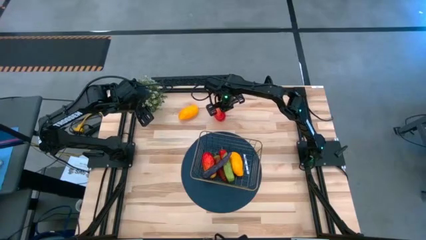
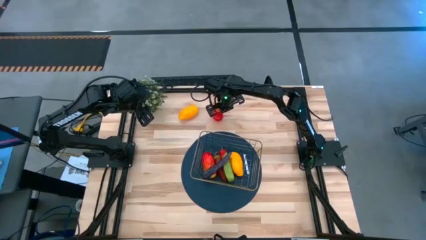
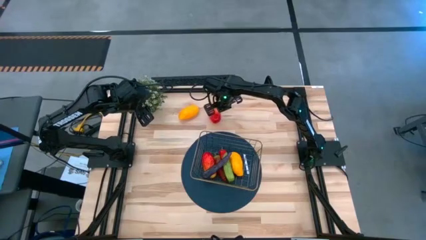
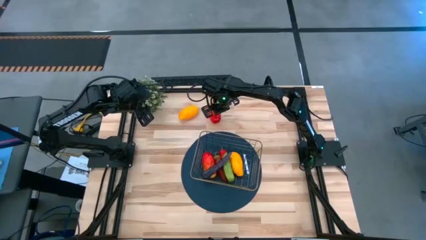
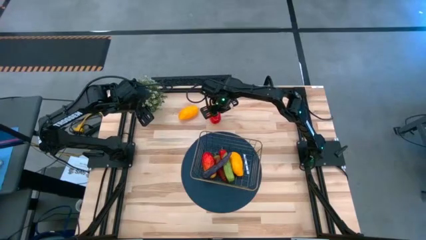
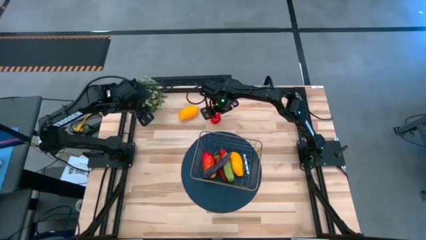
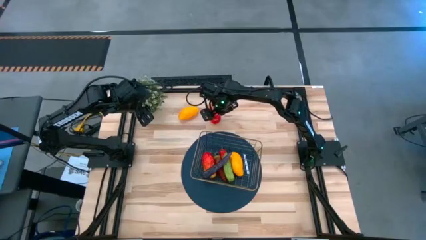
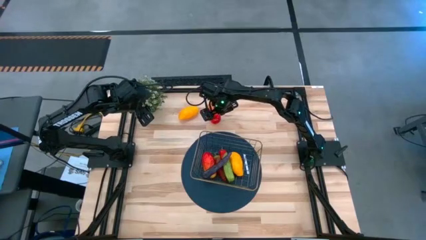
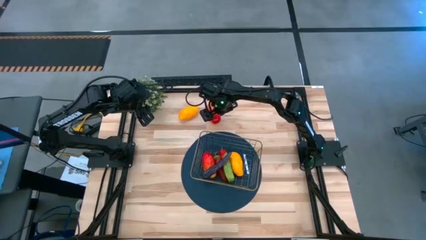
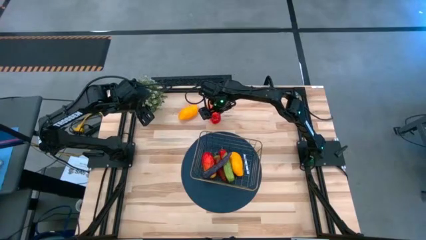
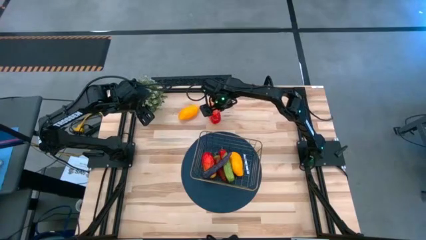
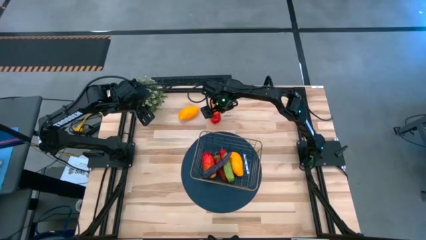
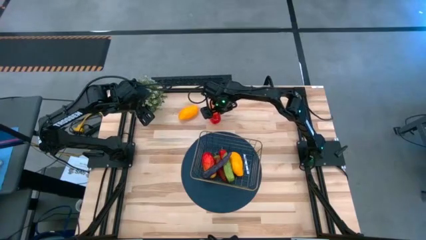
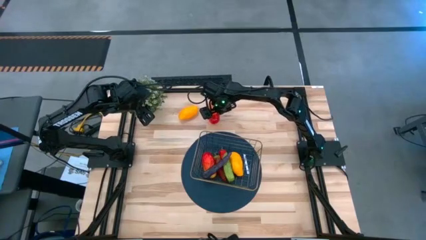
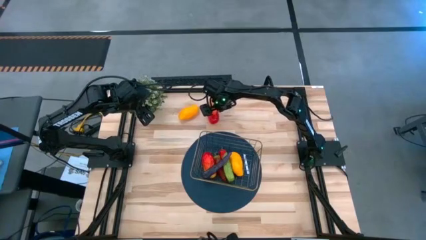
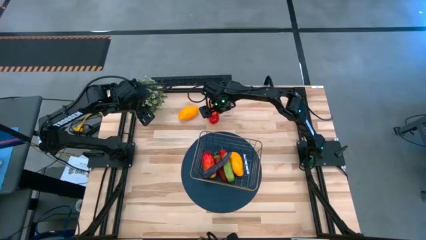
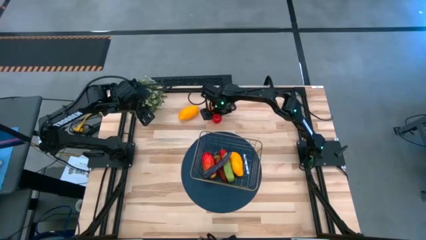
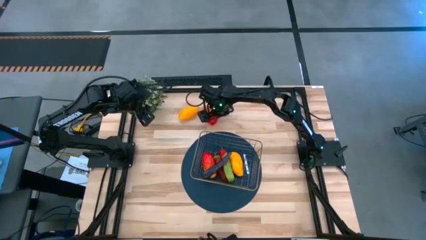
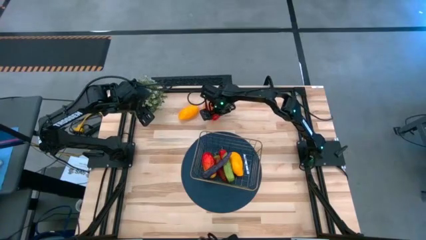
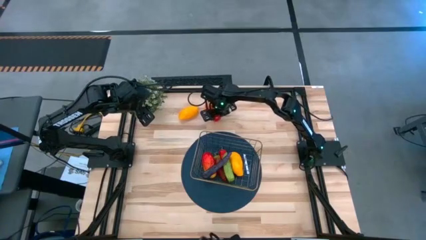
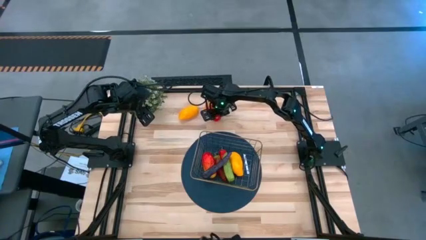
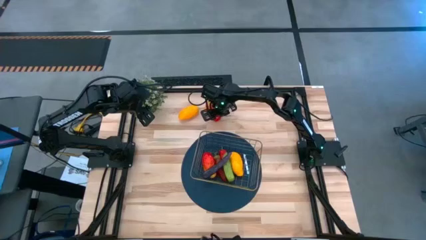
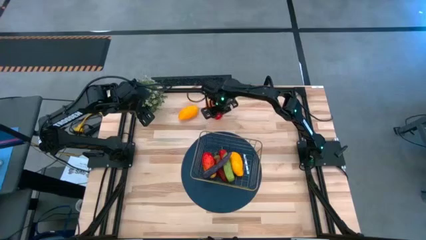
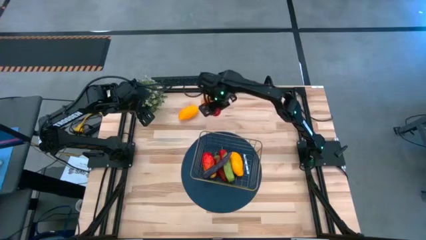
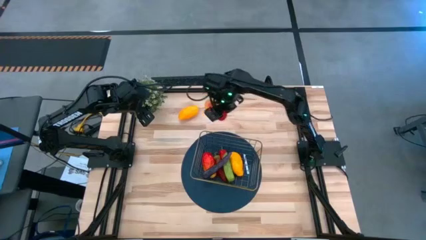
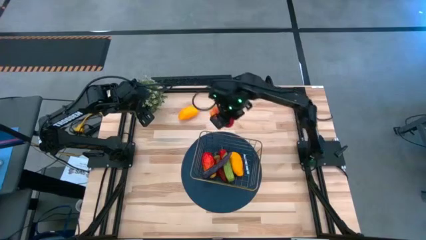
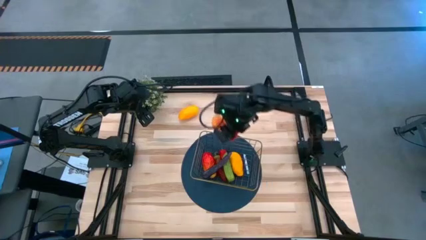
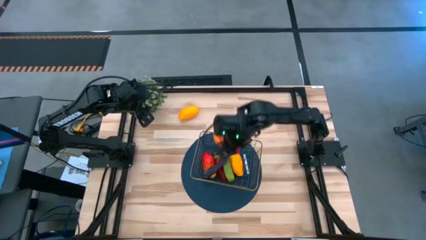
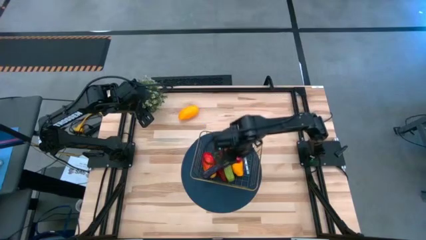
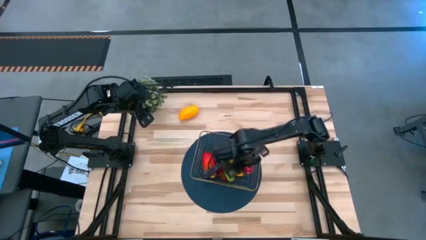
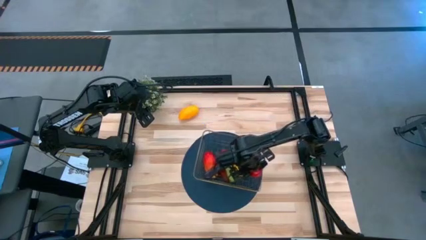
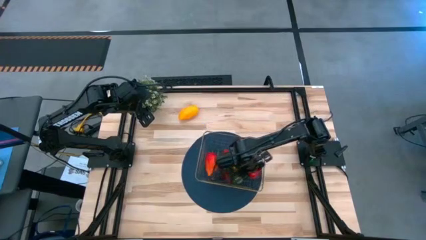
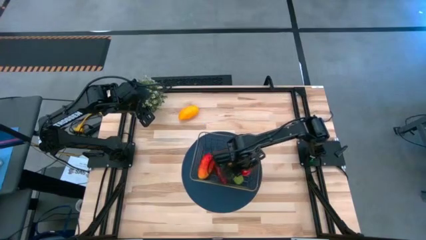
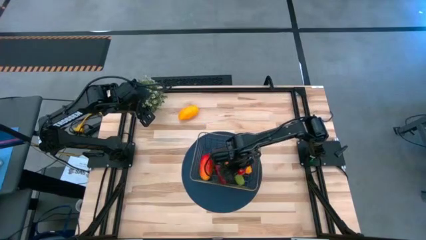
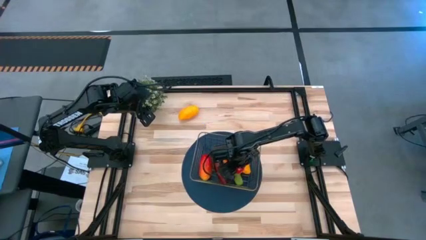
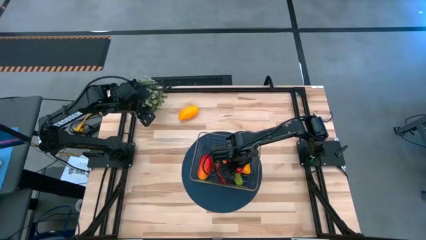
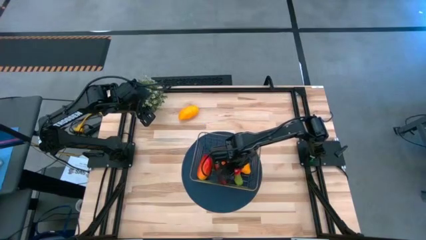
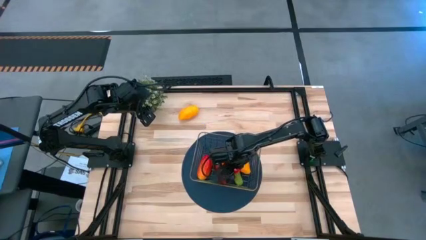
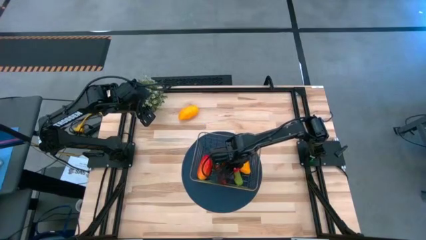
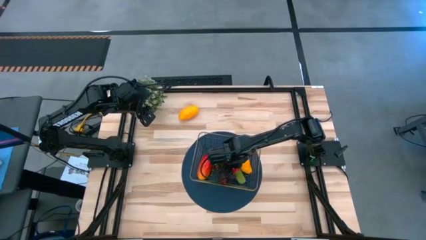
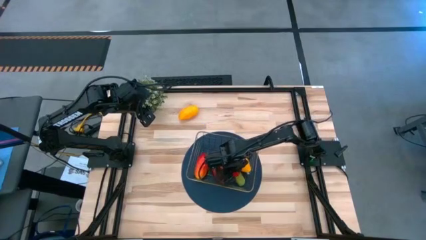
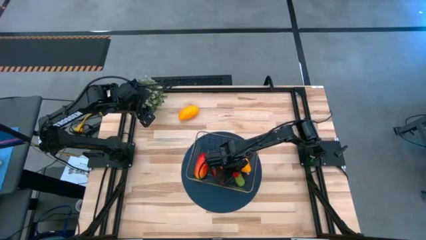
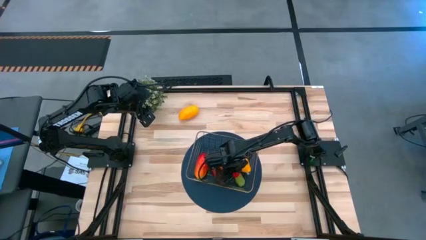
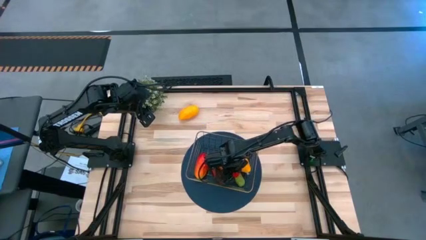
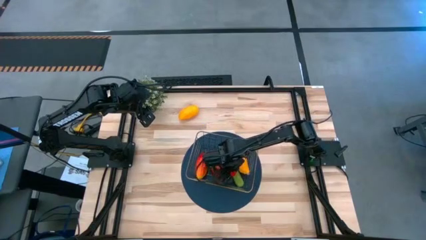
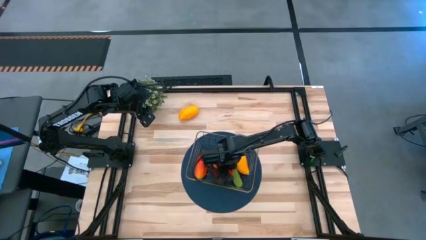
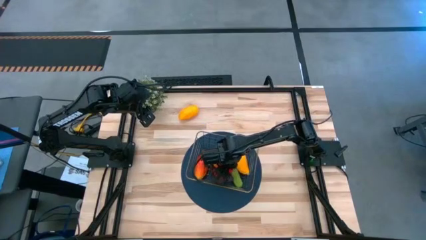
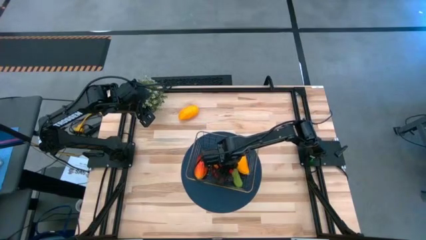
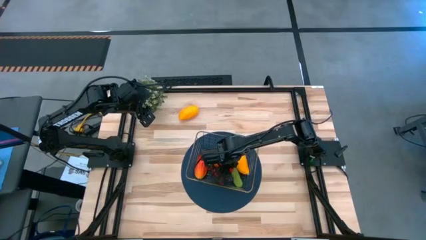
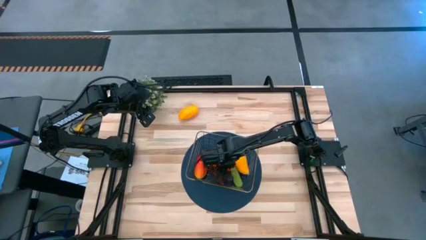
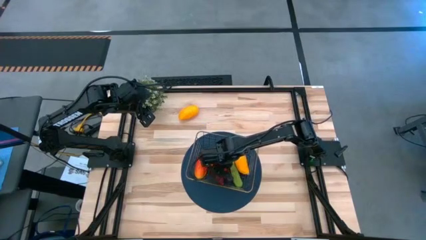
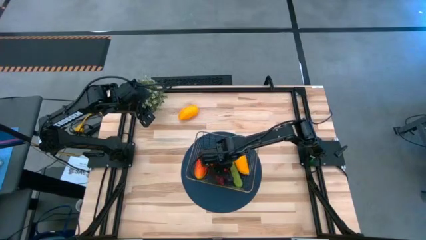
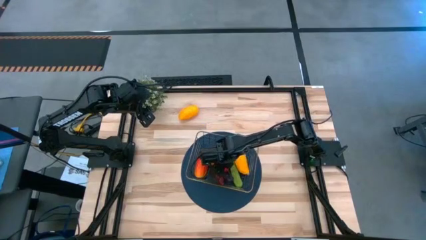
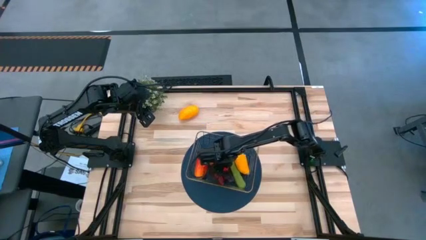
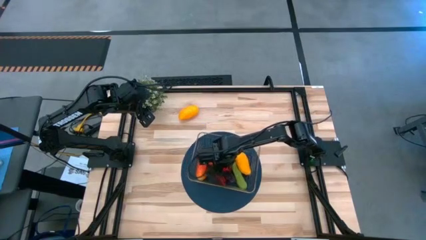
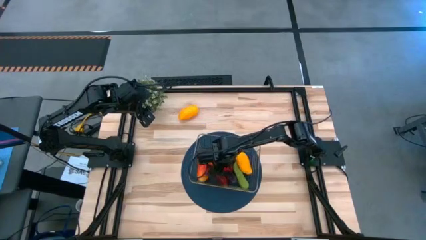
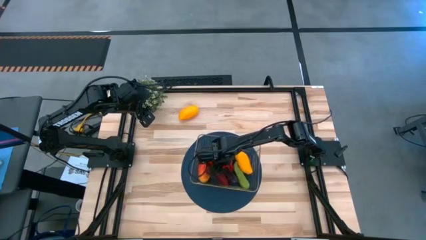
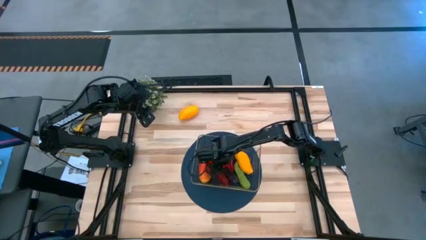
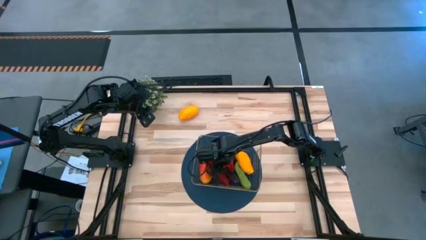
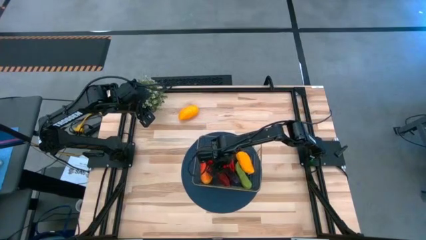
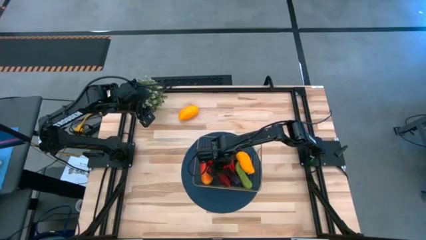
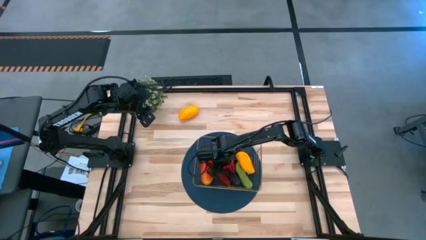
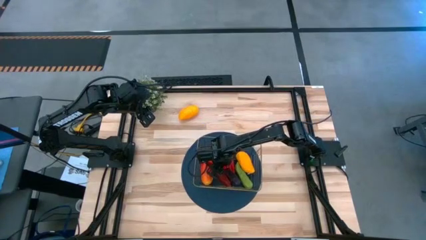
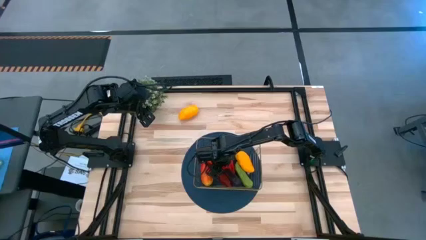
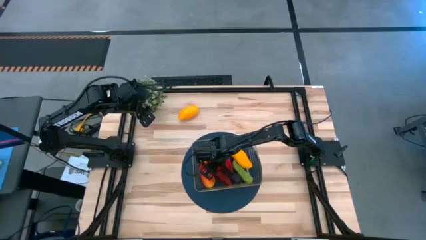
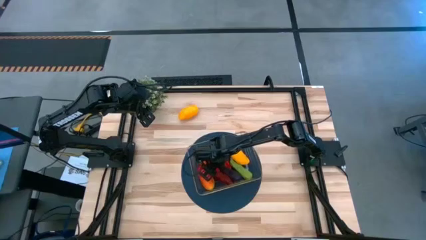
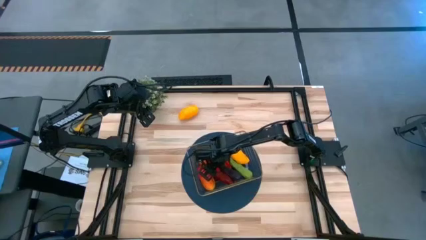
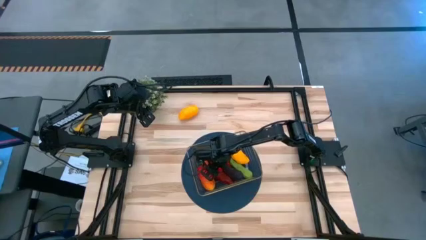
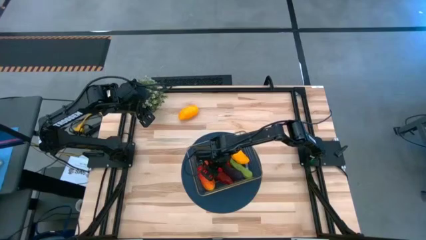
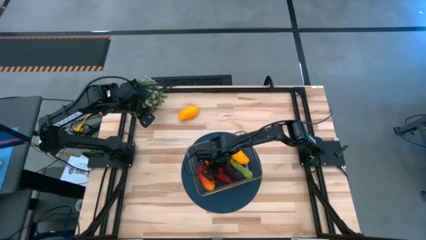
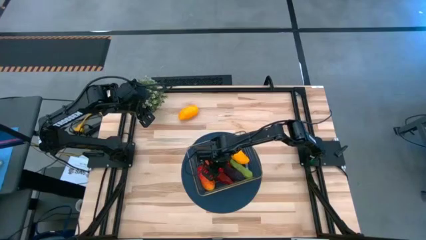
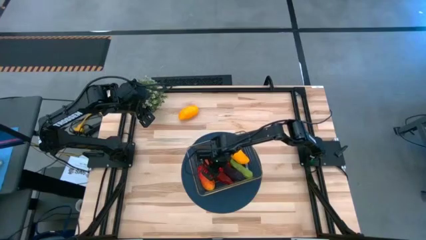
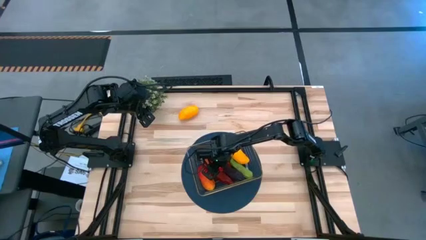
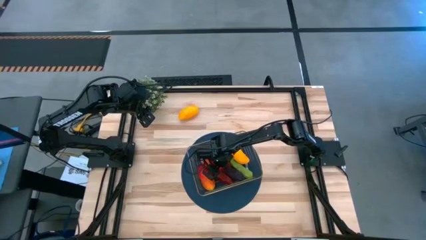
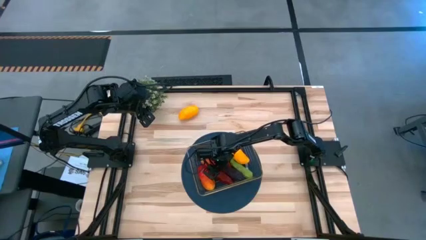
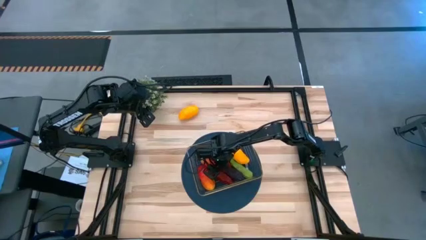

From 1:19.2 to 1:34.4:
Task: Build produce basket
Put the red mango into the gold wire basket
